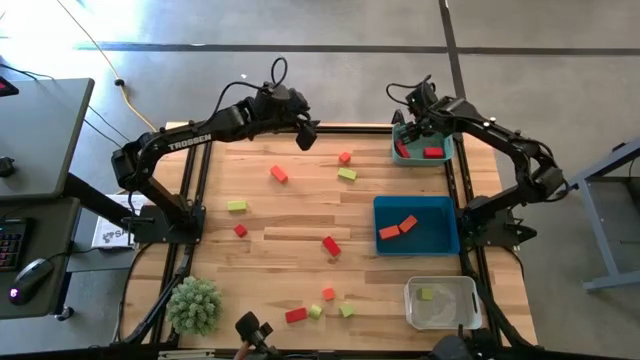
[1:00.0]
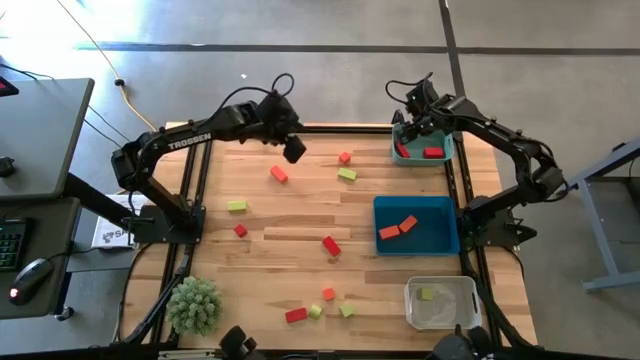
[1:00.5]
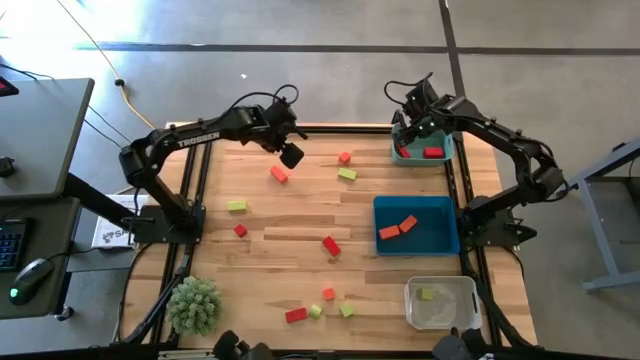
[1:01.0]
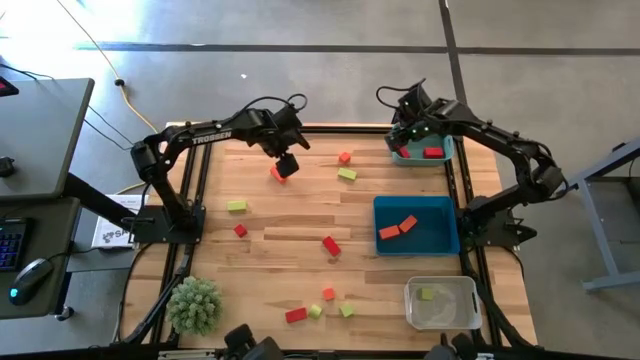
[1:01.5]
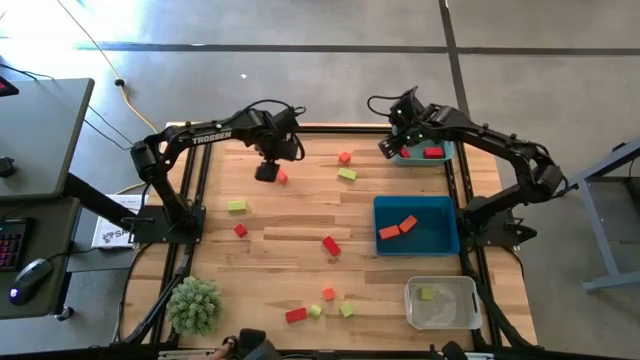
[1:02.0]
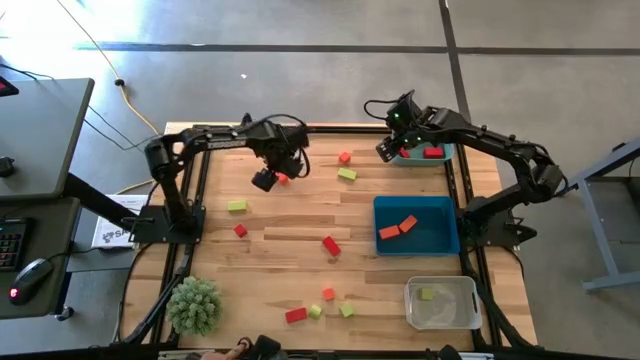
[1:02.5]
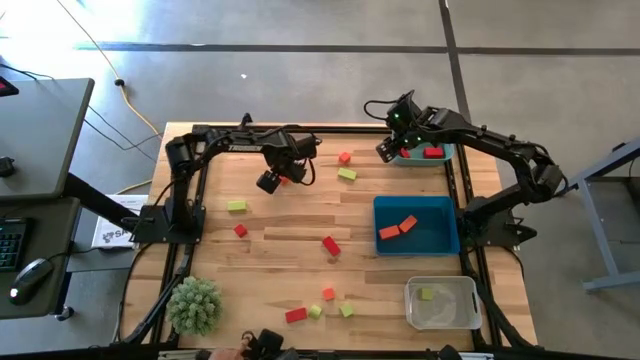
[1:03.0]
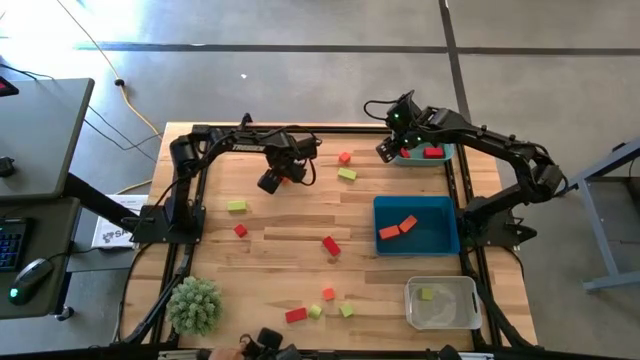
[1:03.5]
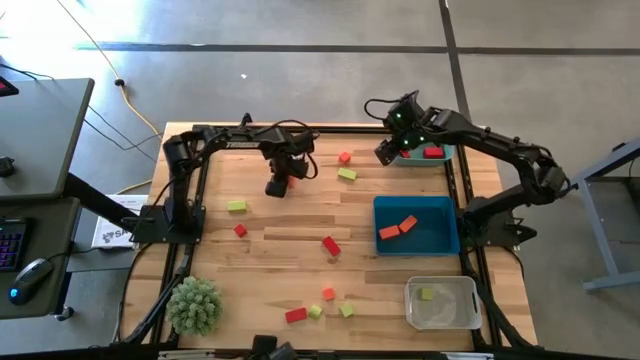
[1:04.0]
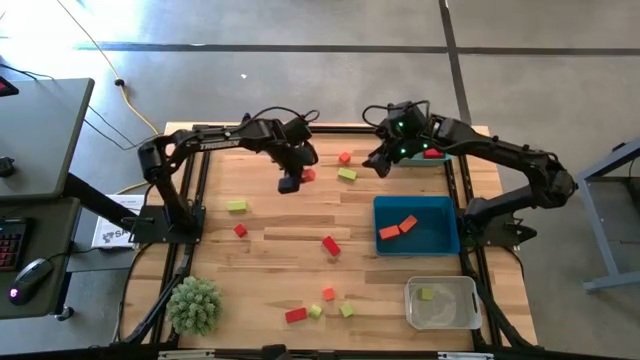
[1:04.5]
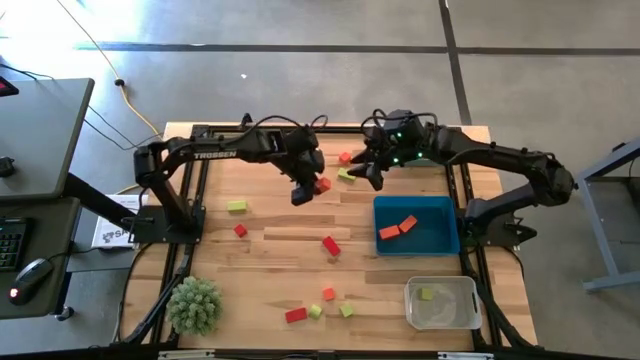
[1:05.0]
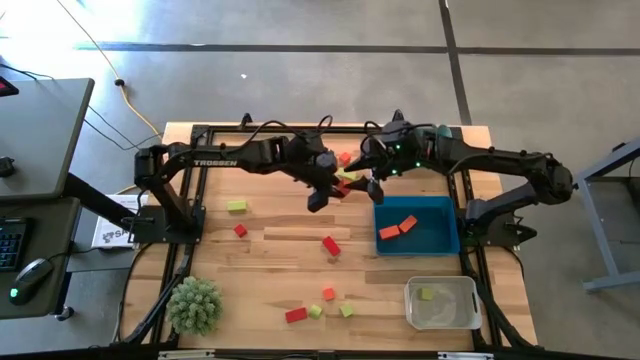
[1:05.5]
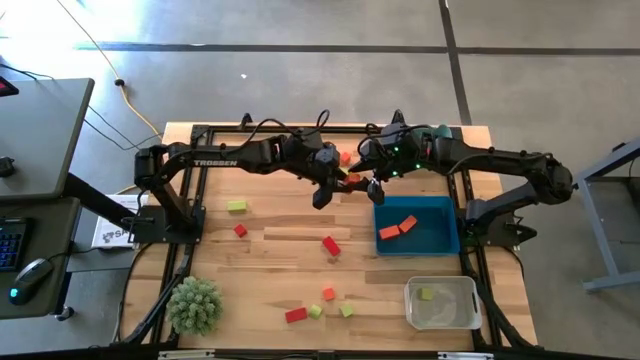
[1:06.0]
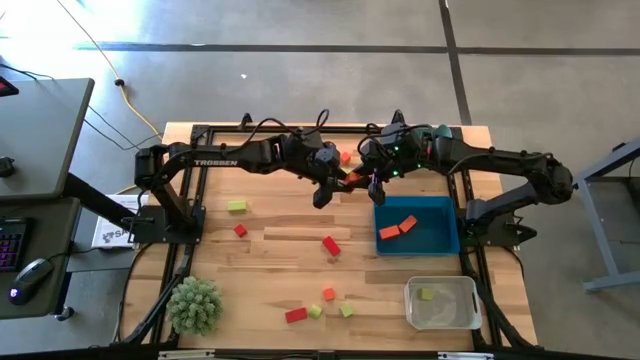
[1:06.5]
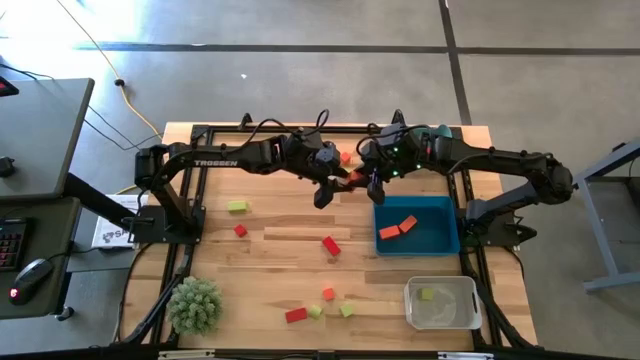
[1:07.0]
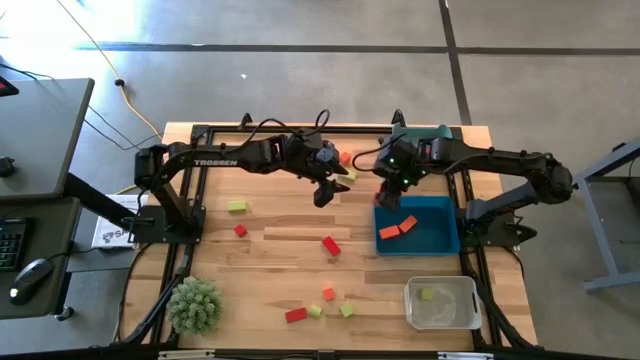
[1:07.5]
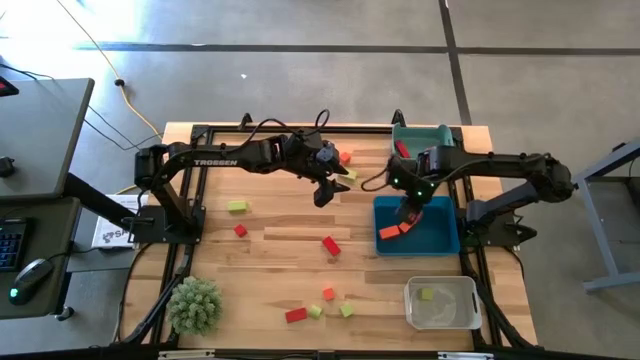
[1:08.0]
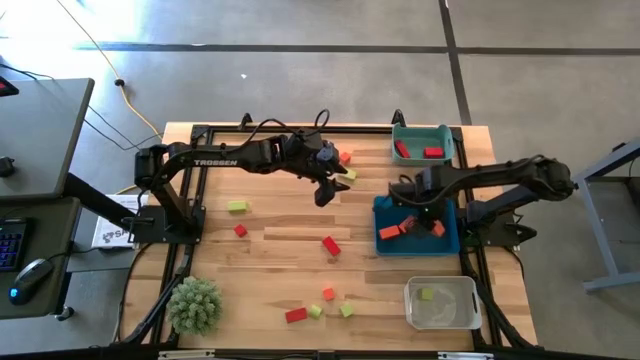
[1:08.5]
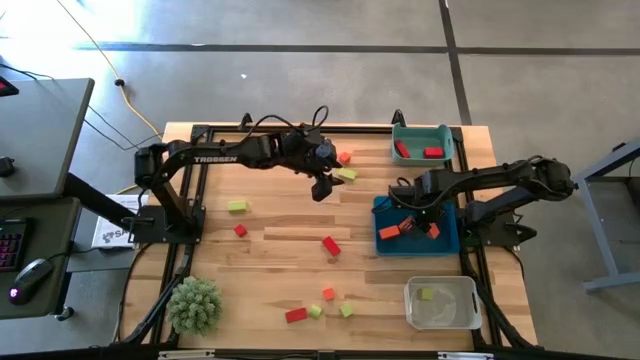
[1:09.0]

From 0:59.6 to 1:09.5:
Task: Sort & place blocks by color
Put the orange wooden block into the blue bin

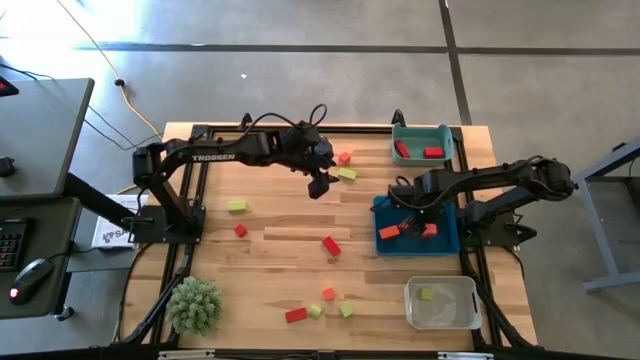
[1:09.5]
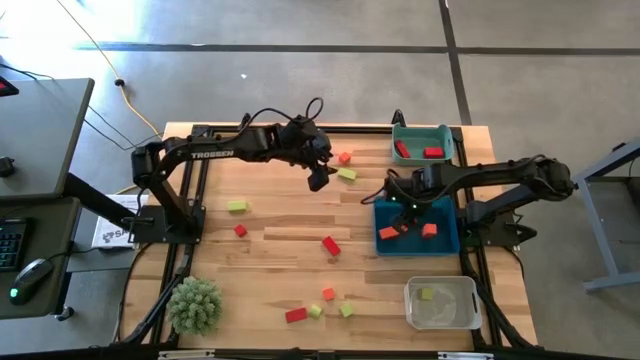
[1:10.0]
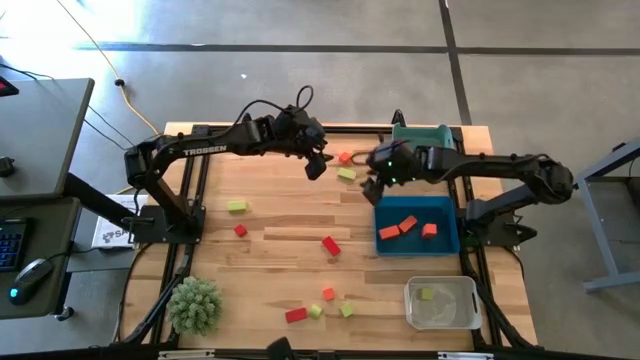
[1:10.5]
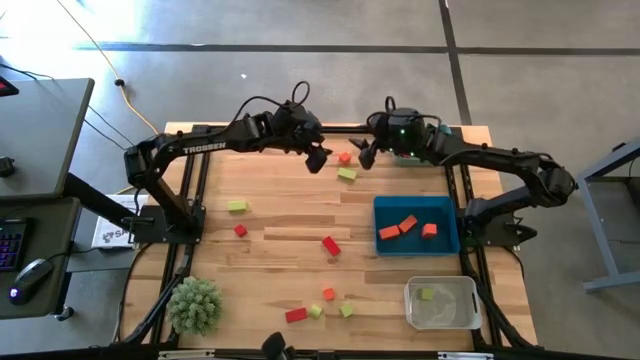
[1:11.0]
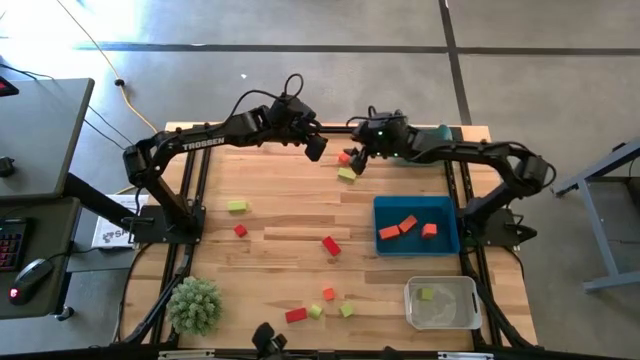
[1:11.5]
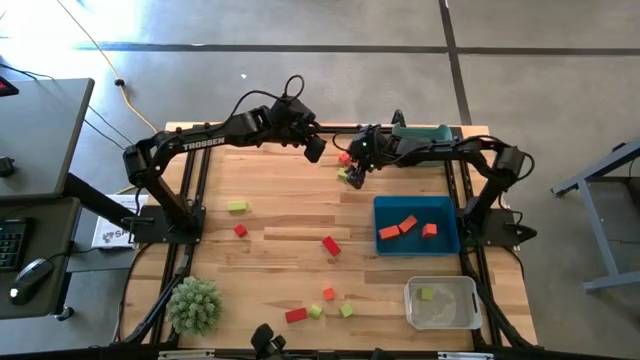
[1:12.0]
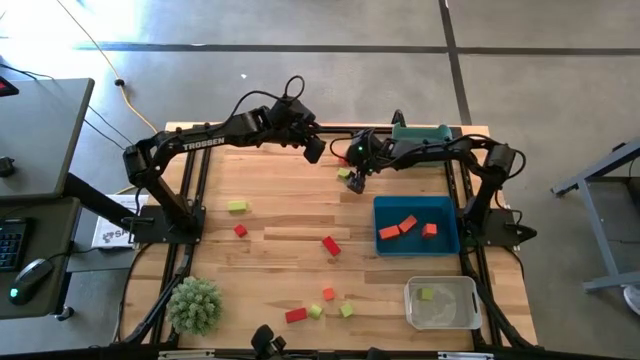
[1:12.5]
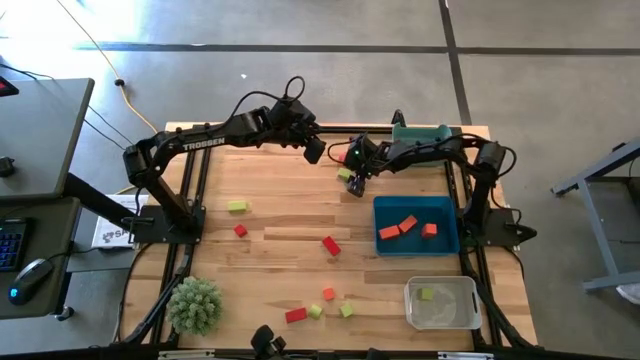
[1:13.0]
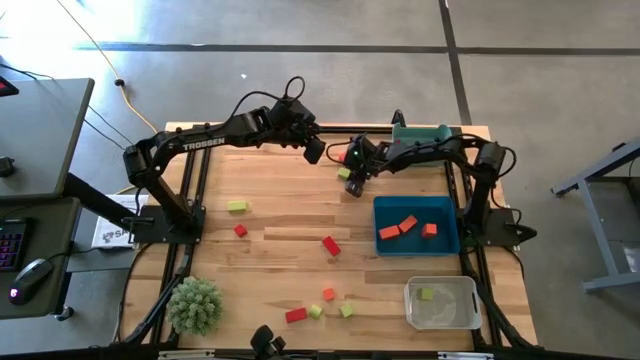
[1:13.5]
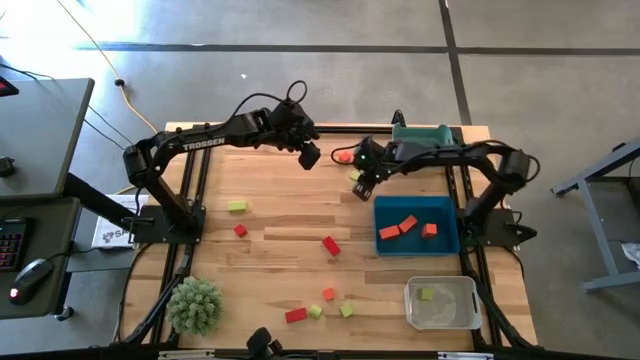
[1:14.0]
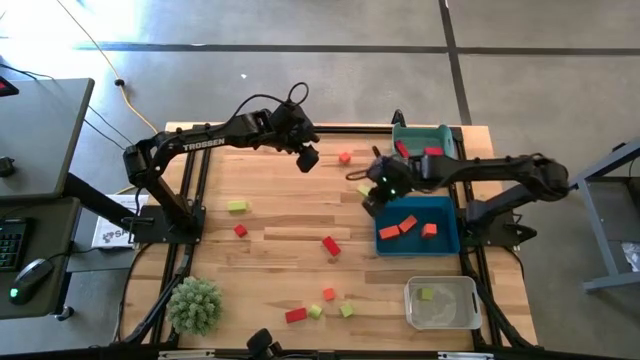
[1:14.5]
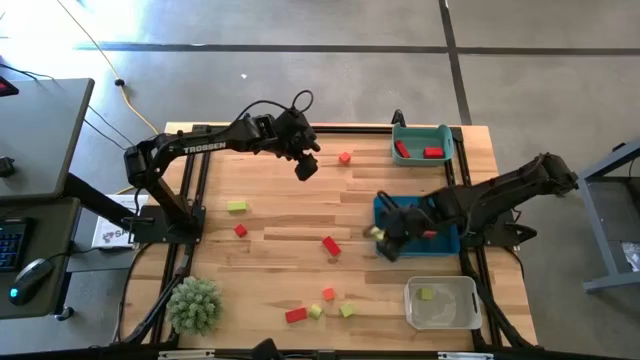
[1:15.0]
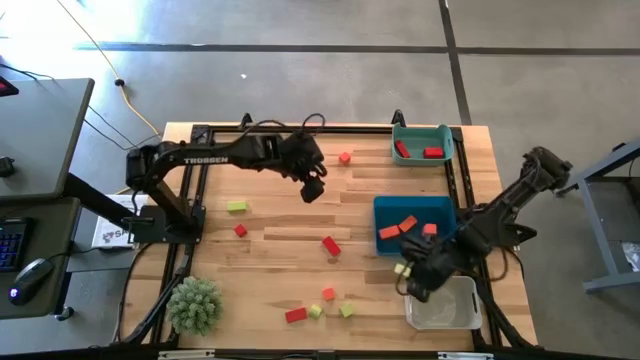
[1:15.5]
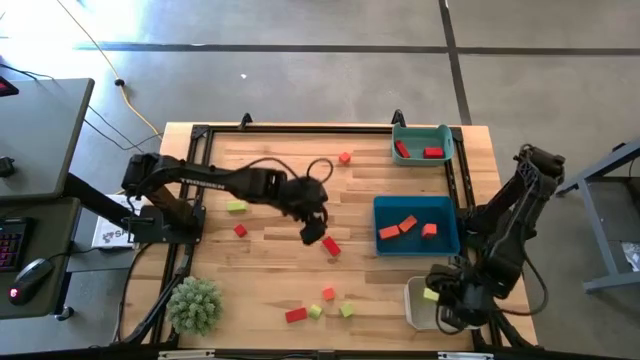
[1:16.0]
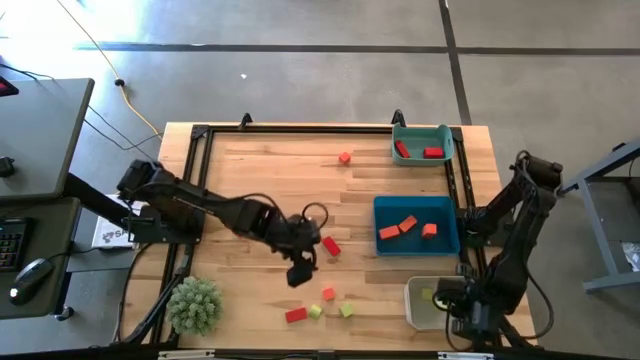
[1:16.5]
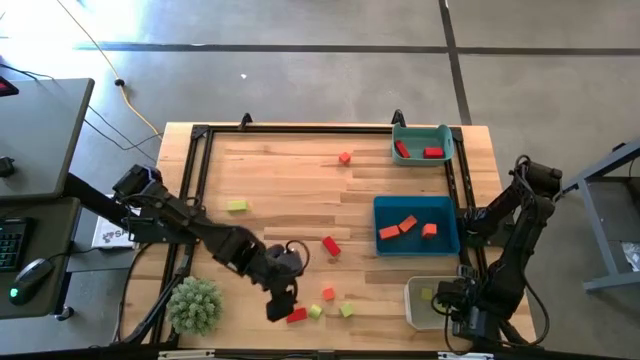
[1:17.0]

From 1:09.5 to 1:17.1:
Put the green wooden block into the white bin
